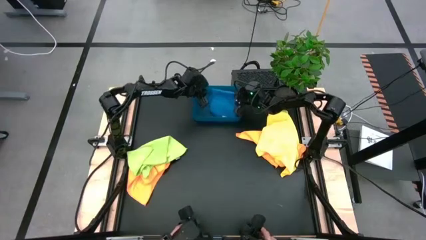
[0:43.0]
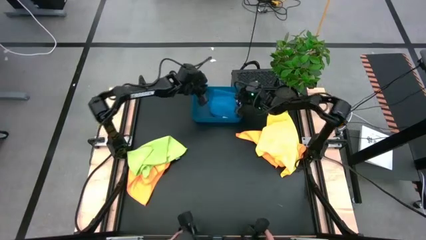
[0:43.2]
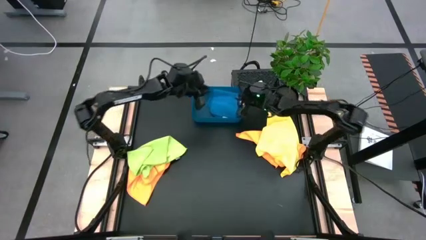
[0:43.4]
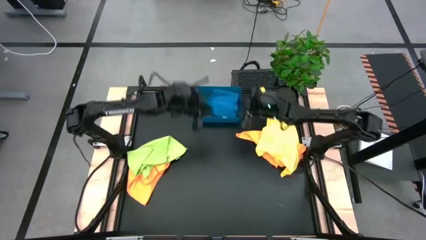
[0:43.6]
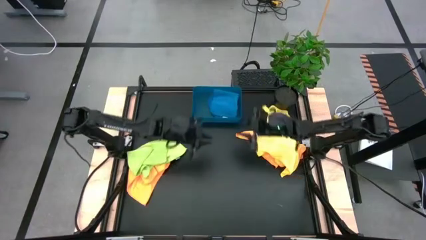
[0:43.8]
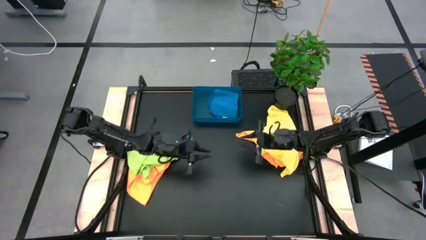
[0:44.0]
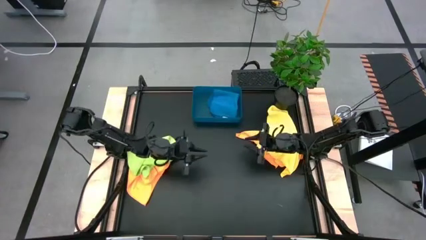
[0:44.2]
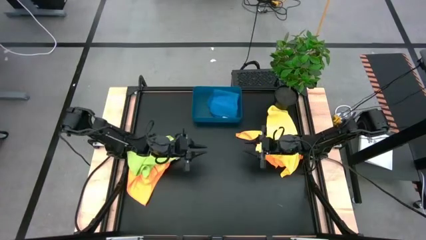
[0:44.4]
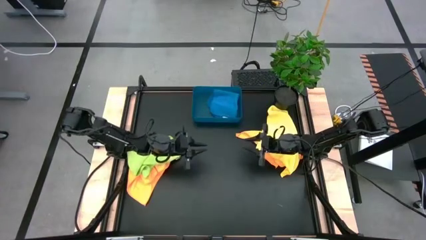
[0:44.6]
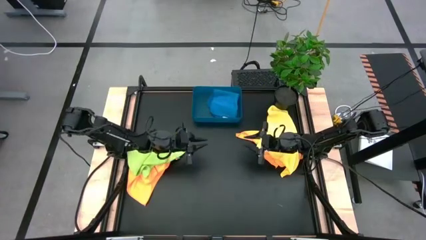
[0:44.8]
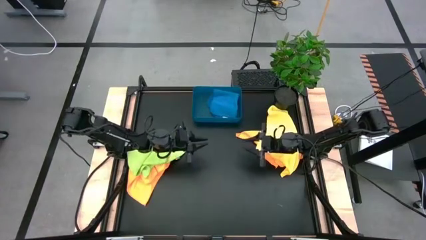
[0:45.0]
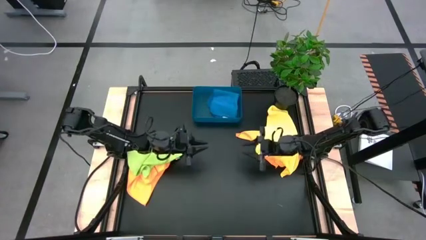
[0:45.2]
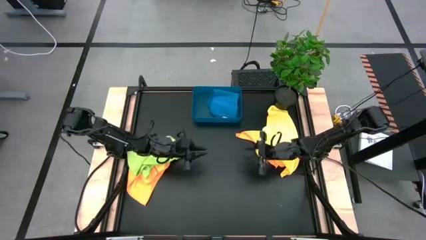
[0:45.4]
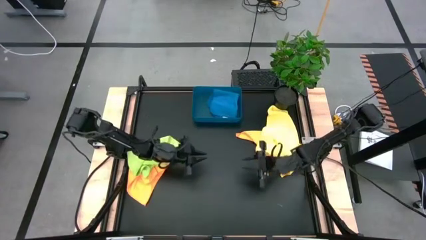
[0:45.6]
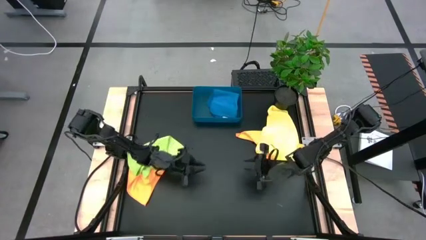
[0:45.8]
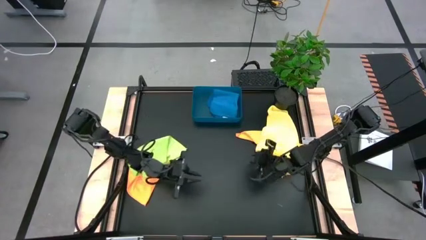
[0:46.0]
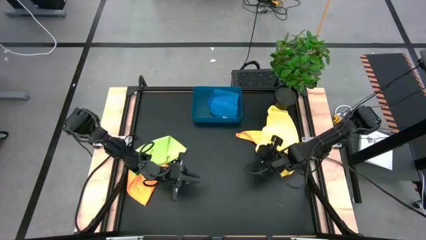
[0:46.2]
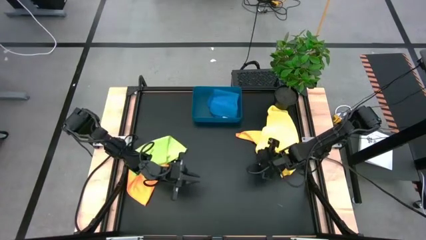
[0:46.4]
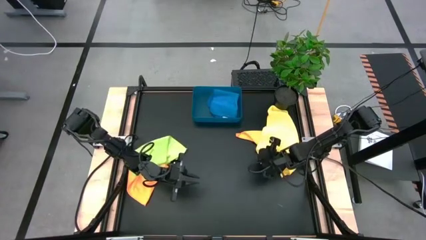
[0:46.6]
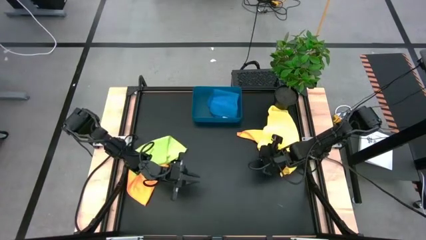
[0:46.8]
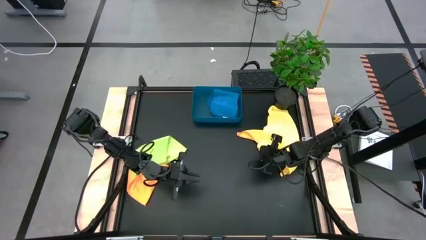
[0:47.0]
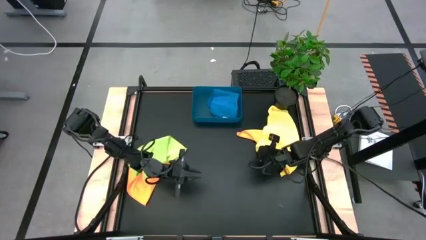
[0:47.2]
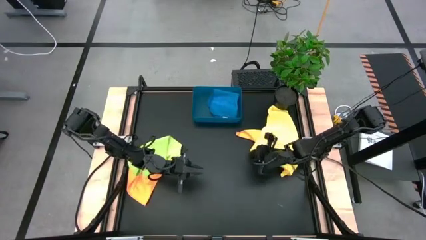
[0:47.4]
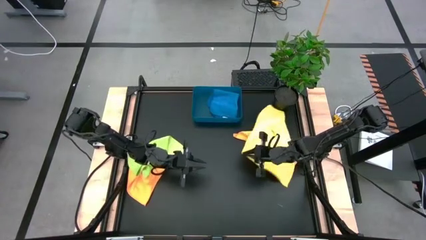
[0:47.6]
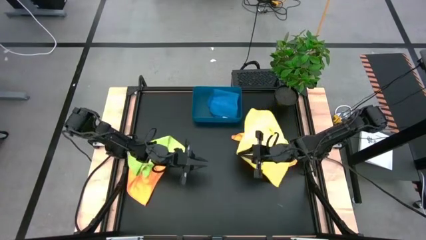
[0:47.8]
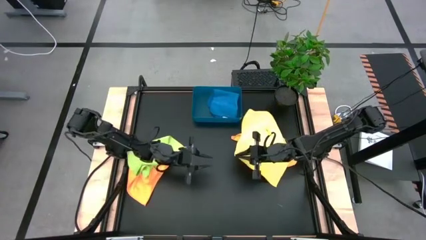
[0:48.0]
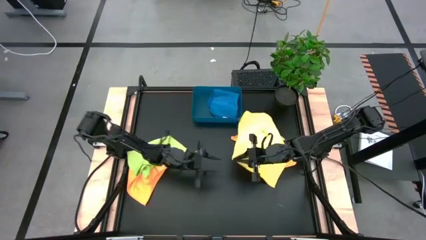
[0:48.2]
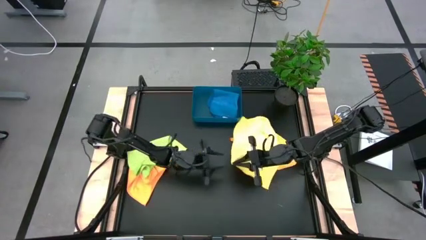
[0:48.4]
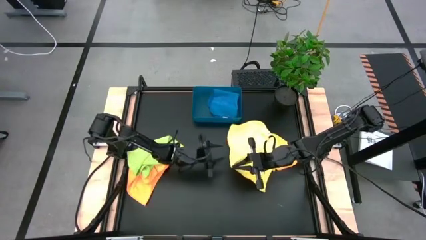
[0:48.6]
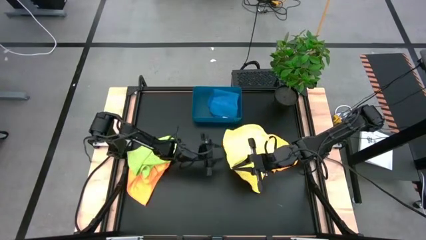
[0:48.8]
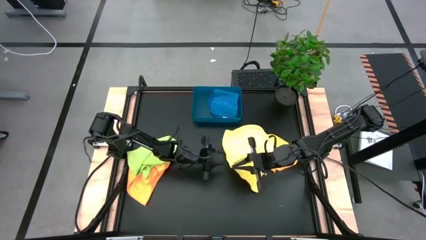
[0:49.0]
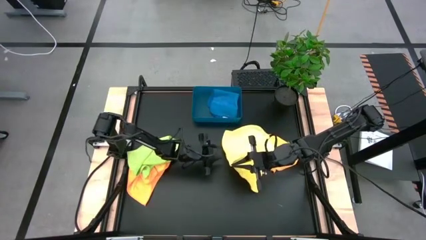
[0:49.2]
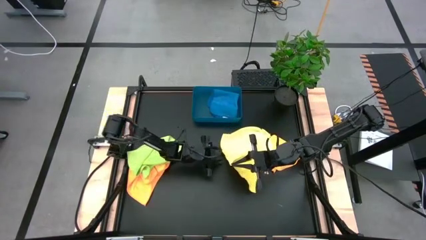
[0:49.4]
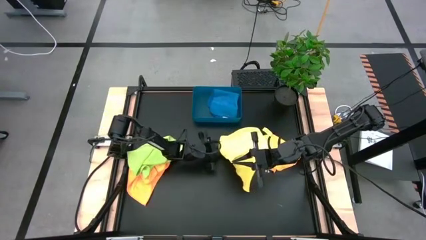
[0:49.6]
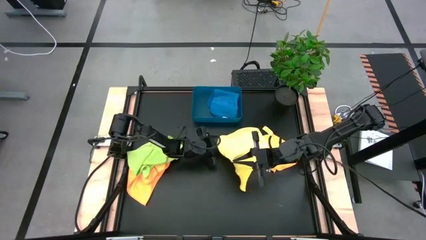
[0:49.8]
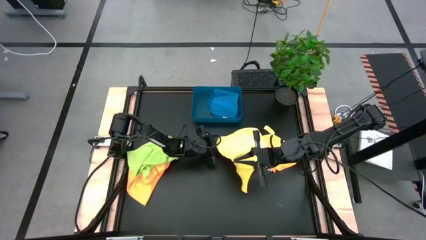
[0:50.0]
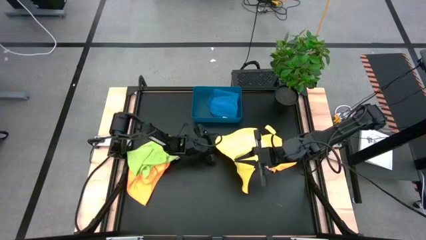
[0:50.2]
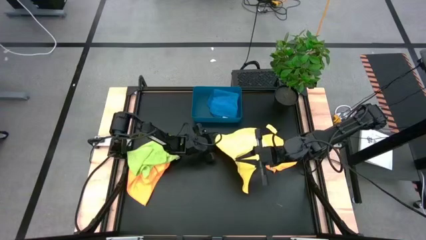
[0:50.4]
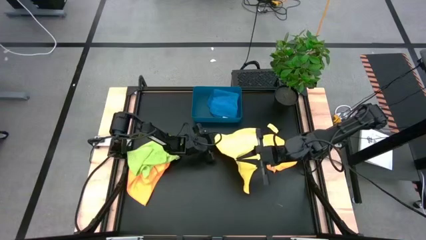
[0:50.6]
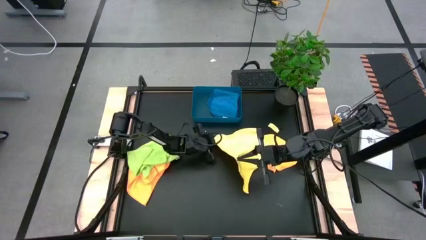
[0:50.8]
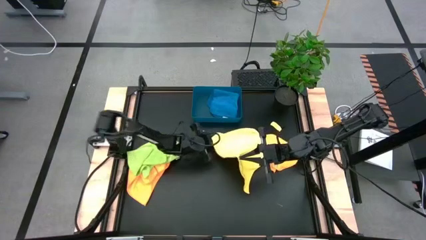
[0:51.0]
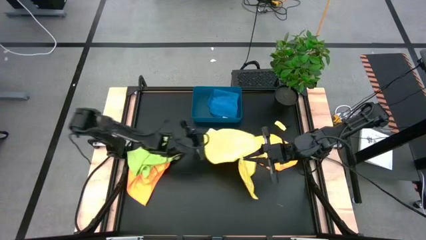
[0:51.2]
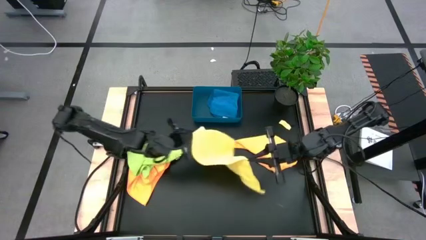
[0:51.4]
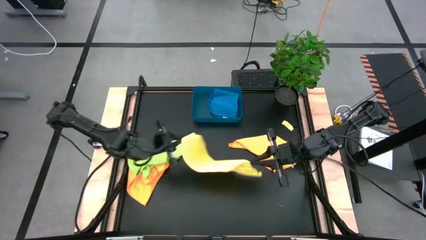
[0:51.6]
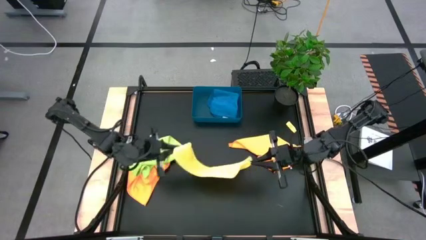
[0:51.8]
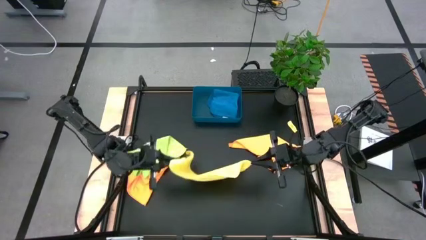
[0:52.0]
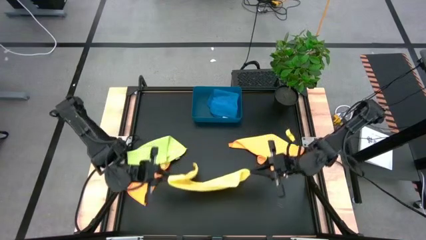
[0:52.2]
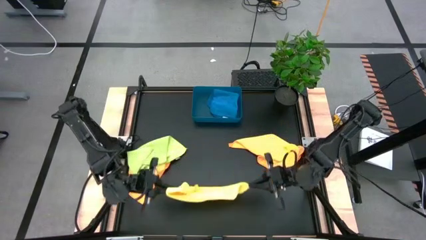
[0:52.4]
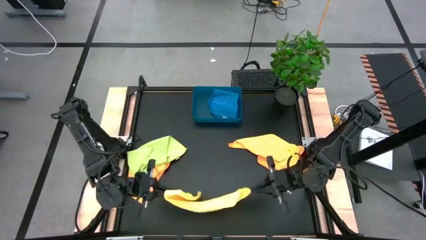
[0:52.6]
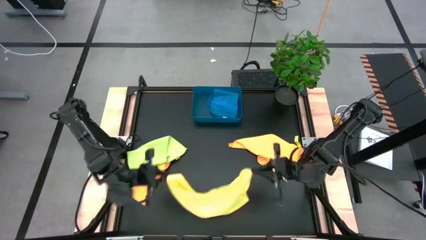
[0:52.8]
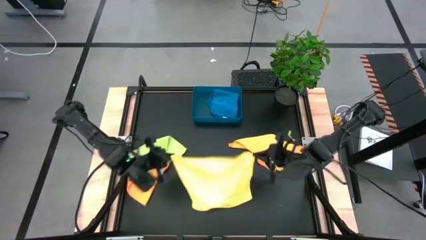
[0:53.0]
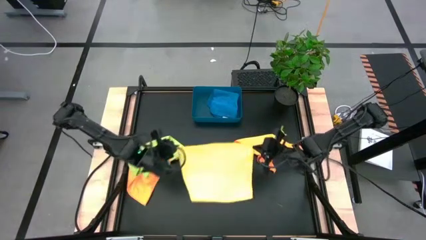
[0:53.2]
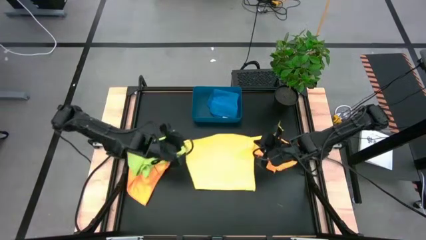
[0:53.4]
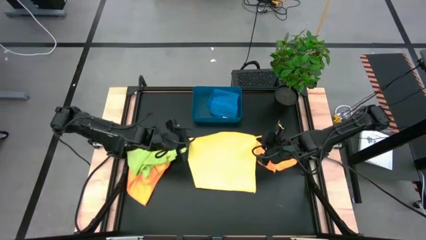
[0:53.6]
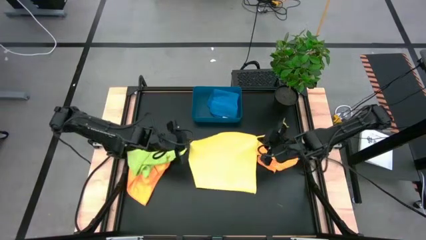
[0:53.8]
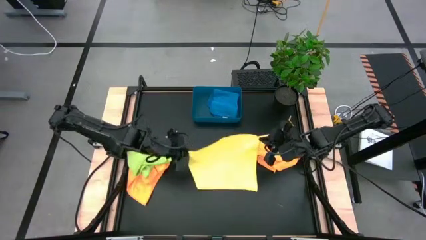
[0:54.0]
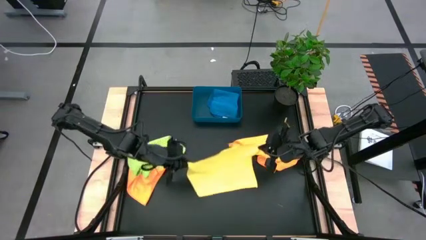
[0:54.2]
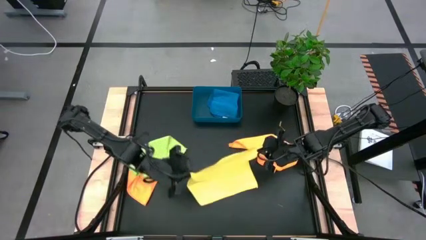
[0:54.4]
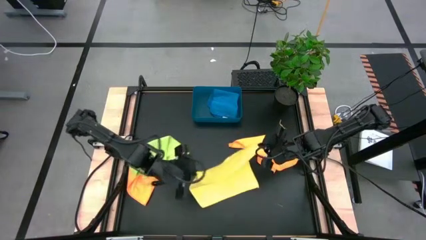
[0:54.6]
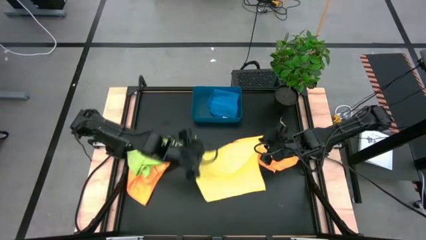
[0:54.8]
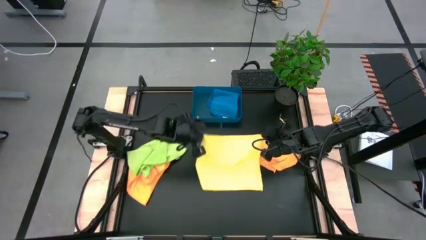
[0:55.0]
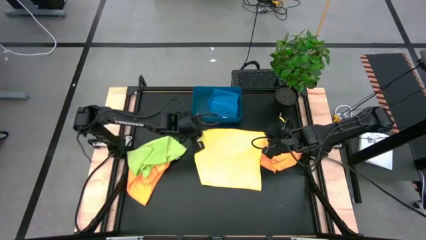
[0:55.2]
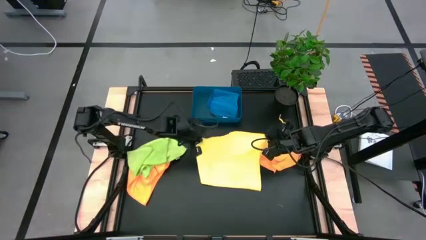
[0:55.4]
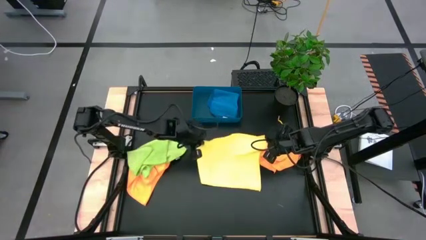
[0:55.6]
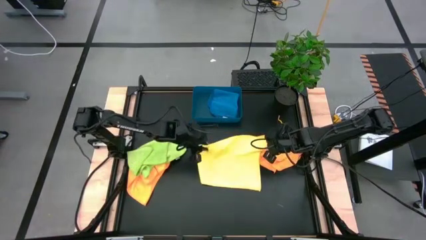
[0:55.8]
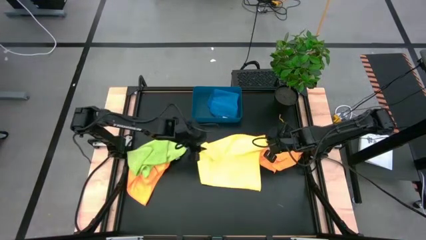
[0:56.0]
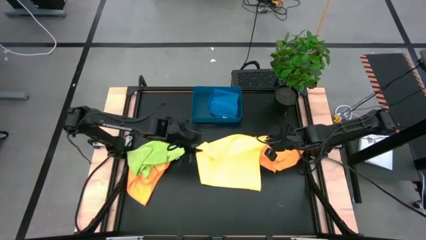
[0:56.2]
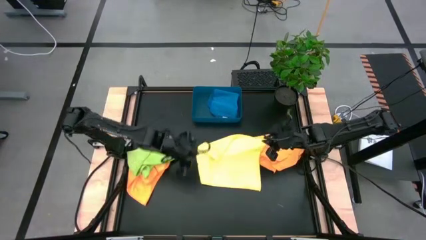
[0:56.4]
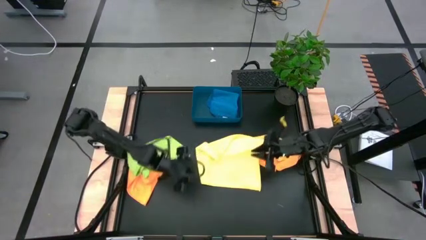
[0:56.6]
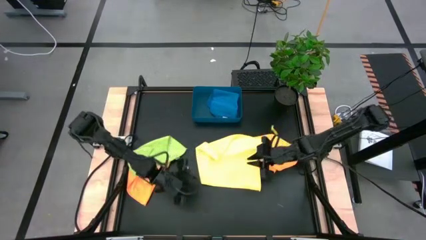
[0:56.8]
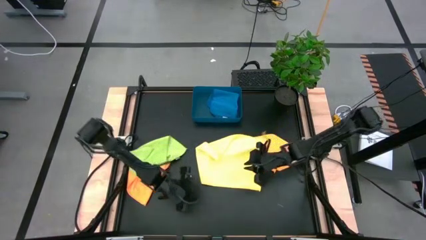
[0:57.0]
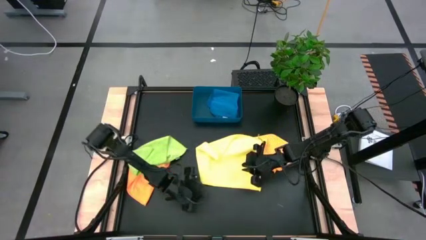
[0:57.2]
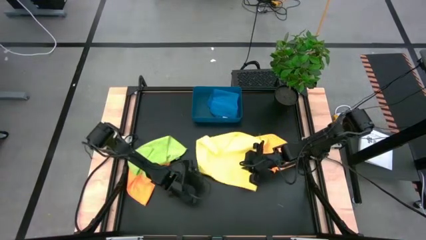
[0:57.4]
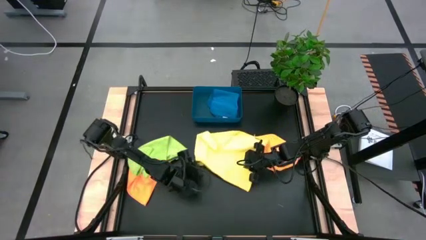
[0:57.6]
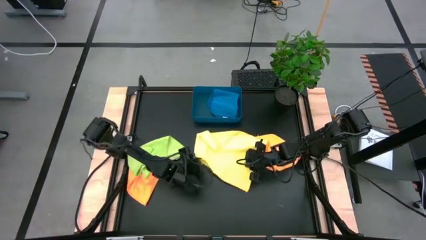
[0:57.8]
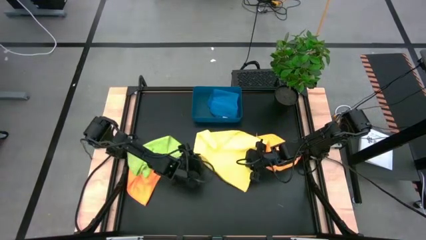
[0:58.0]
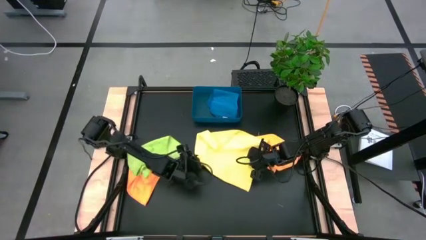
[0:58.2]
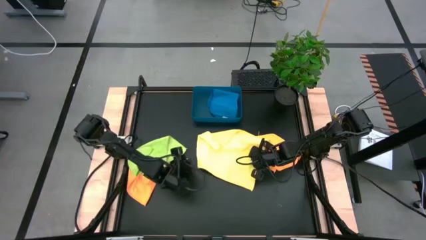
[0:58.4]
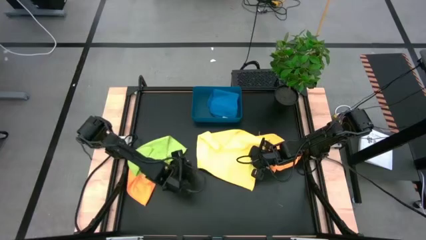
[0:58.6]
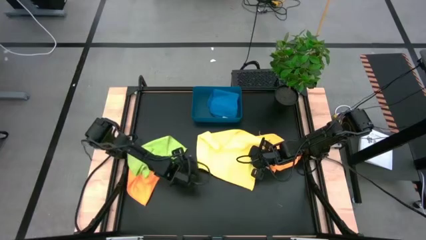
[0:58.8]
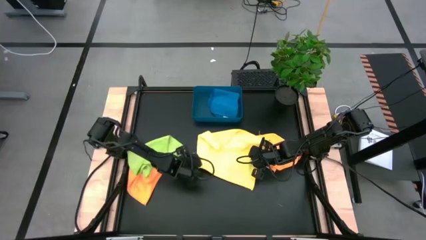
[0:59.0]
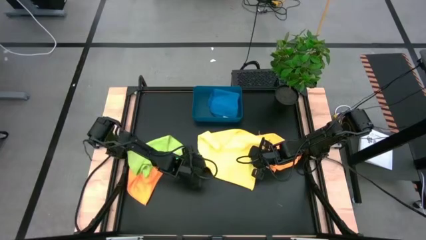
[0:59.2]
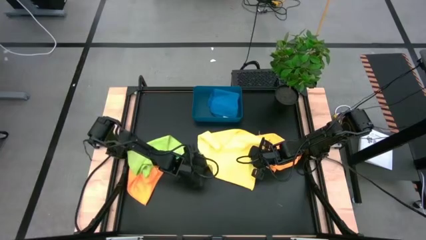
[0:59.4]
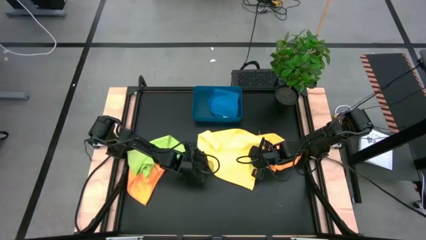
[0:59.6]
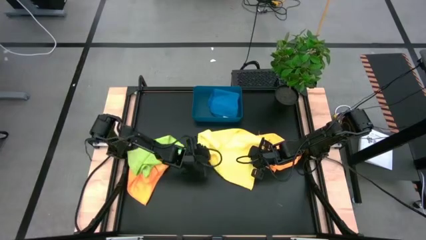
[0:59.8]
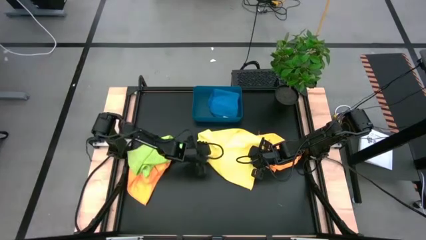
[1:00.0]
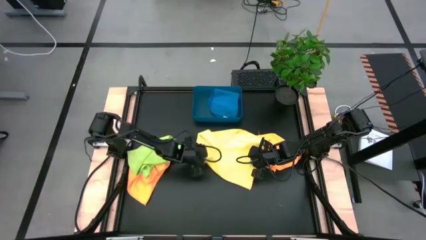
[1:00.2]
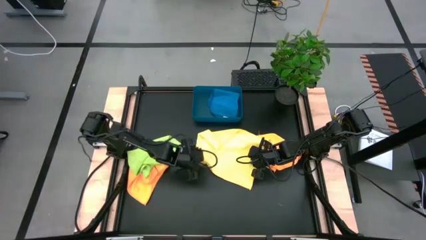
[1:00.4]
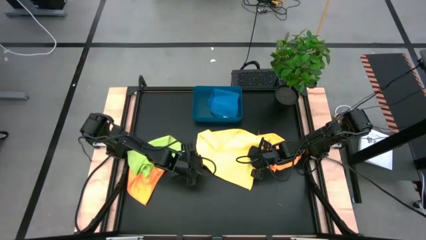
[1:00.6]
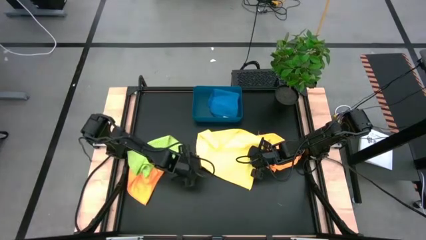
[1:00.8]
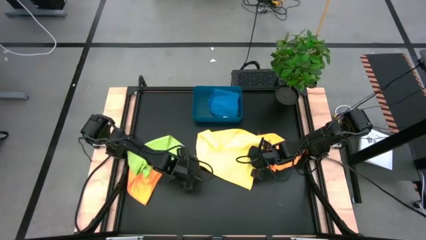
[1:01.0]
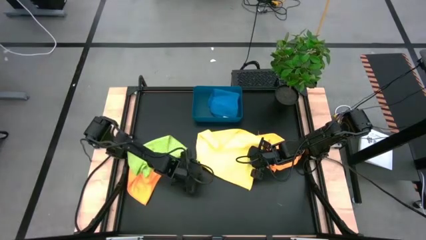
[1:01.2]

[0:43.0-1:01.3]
Task: Fold microfiber towels
Fold the yellow microfiber cloth
